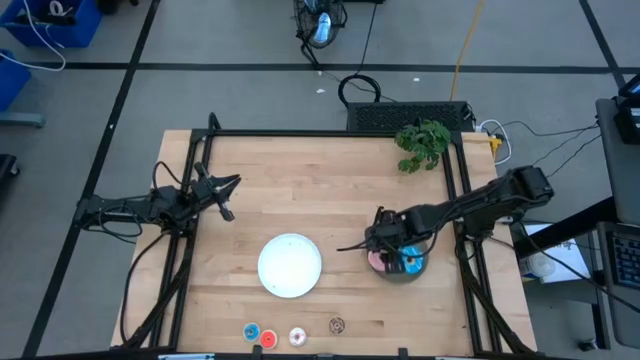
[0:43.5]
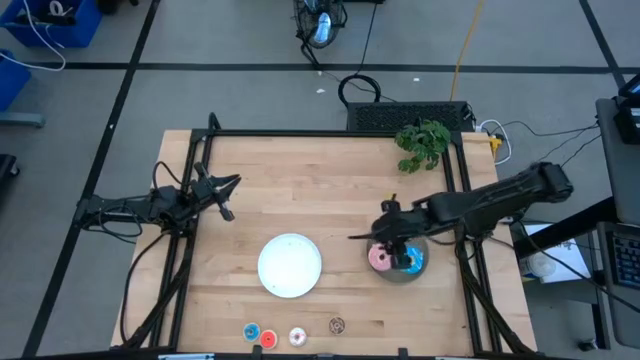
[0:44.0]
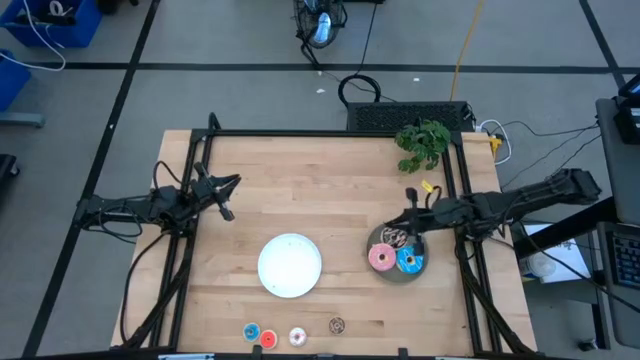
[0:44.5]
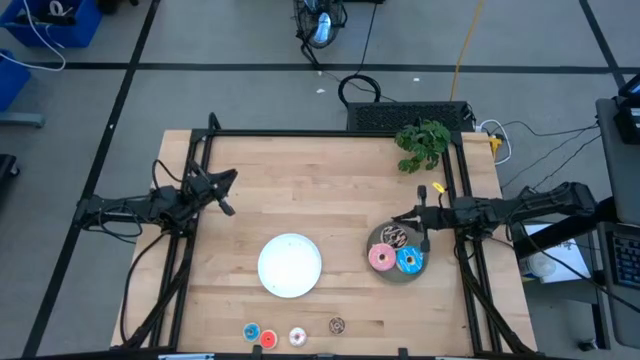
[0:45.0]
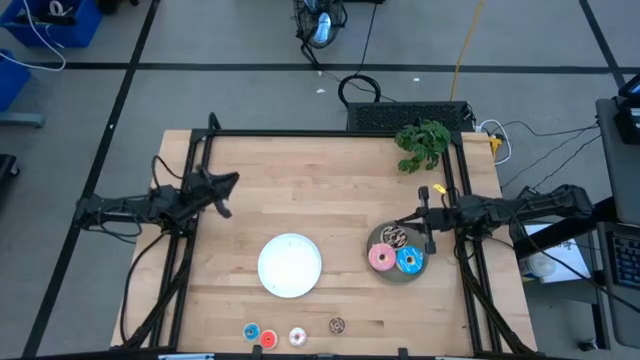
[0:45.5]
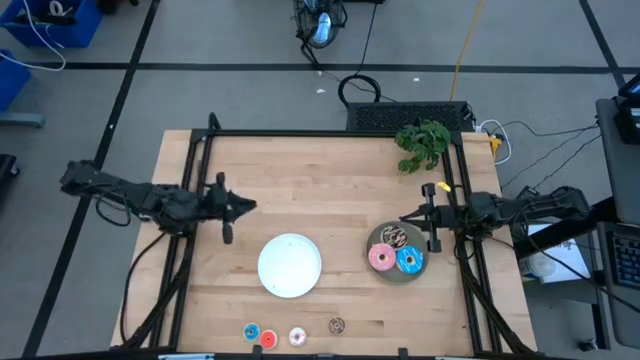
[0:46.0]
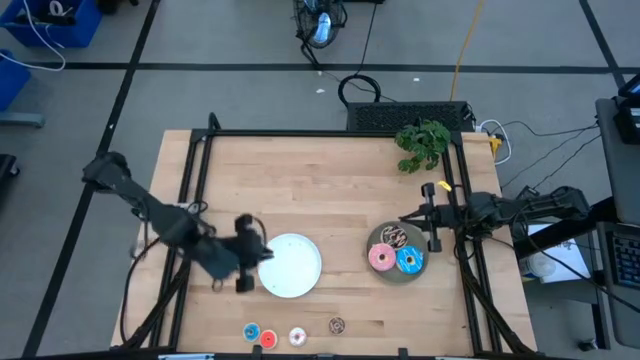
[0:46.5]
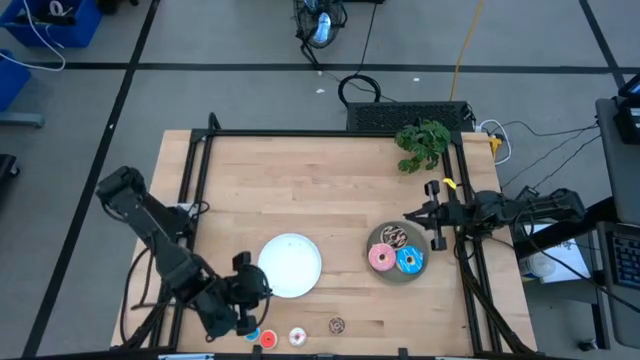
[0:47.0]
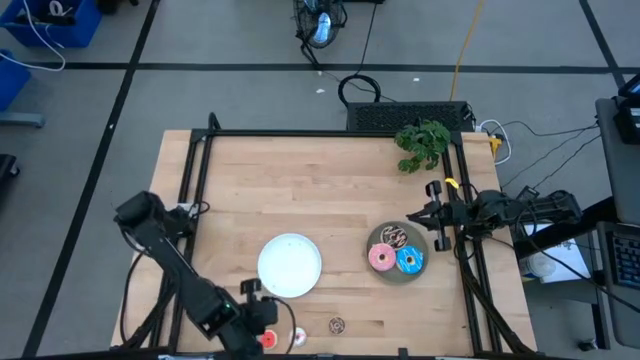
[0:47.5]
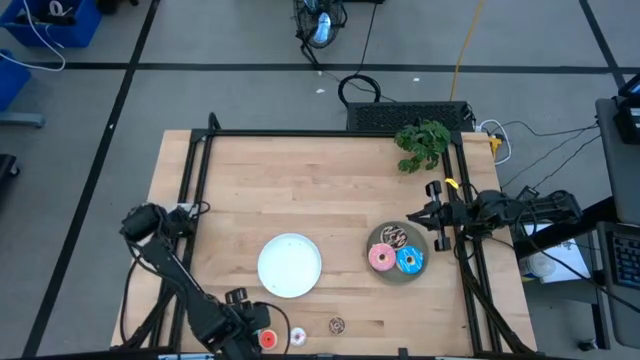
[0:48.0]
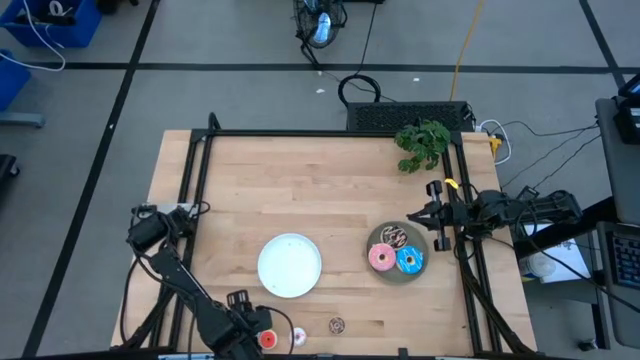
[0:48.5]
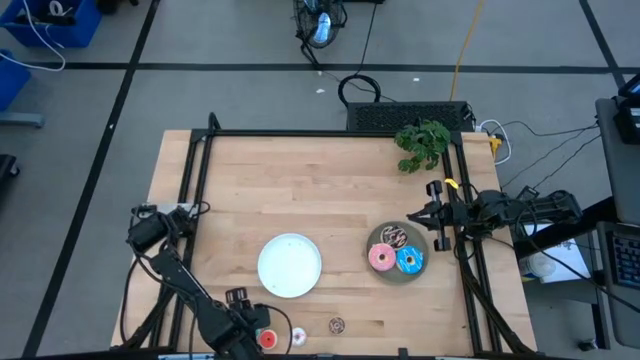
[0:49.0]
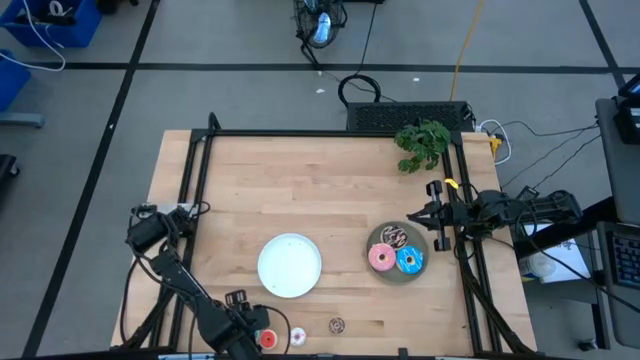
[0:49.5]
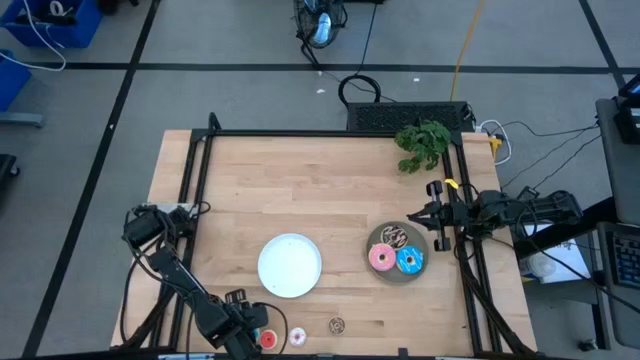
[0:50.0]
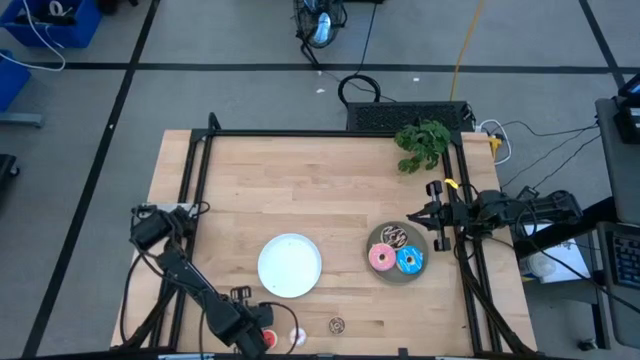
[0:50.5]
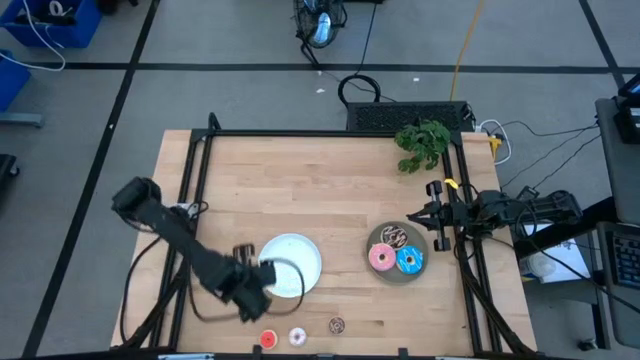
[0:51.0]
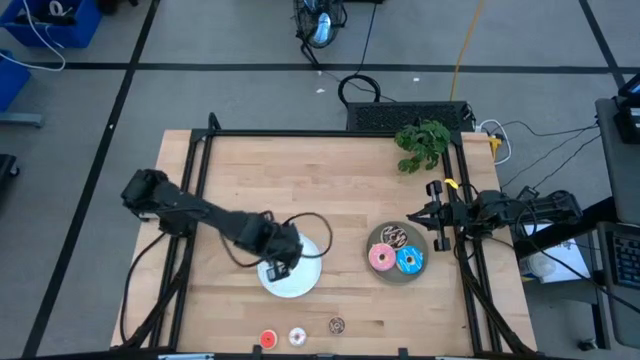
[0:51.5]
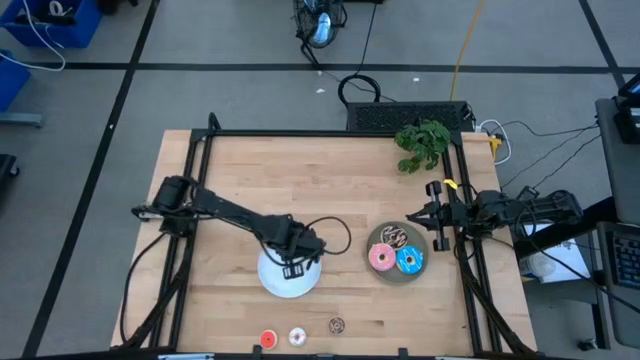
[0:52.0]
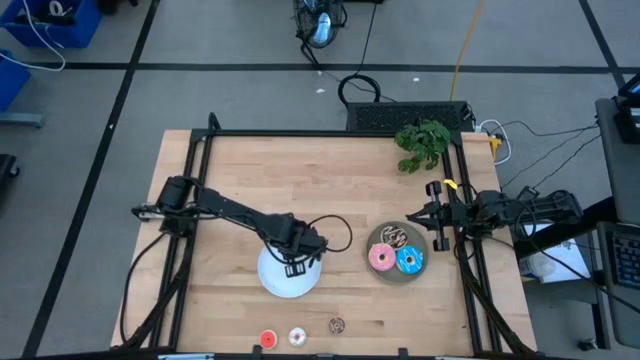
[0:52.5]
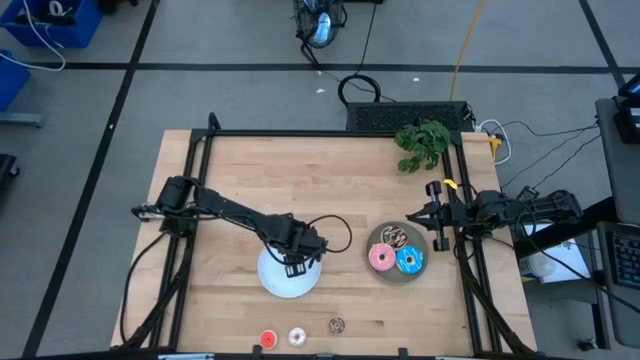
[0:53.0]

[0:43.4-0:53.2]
Task: Pick & Place donuts
Put the small blue donut on the white plate

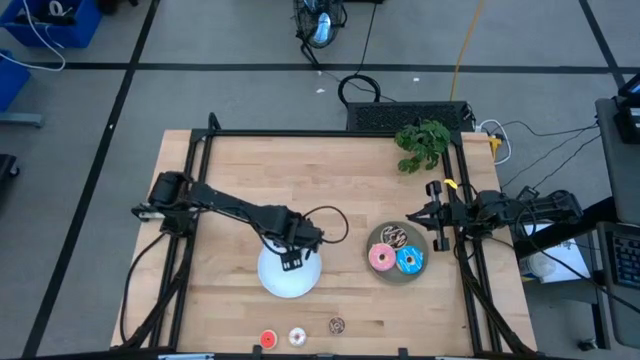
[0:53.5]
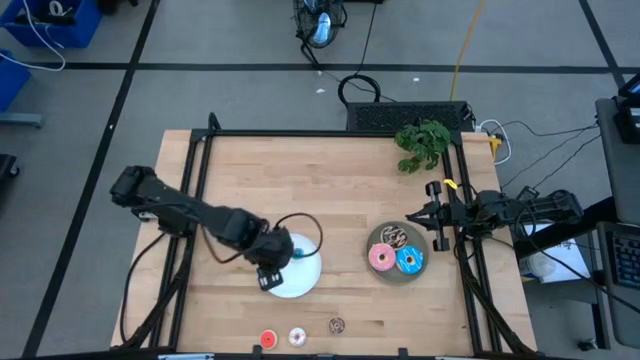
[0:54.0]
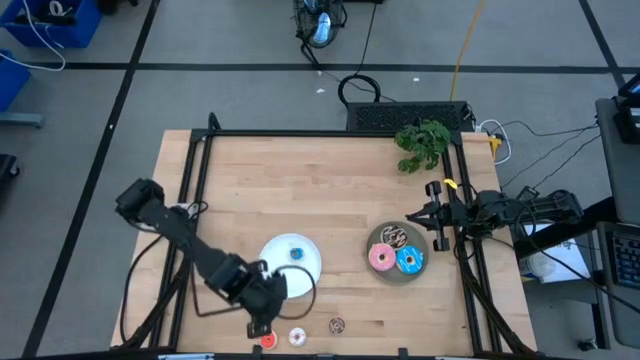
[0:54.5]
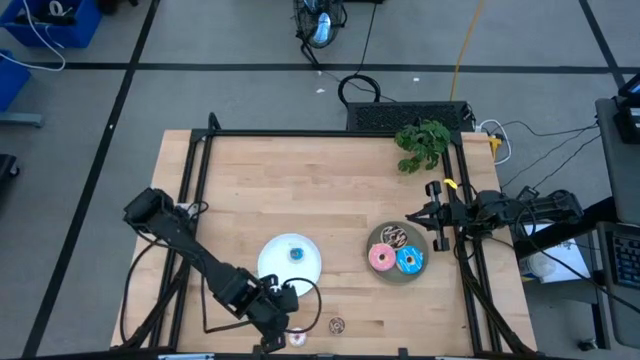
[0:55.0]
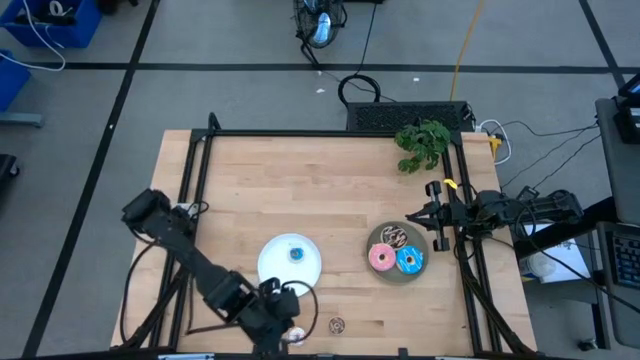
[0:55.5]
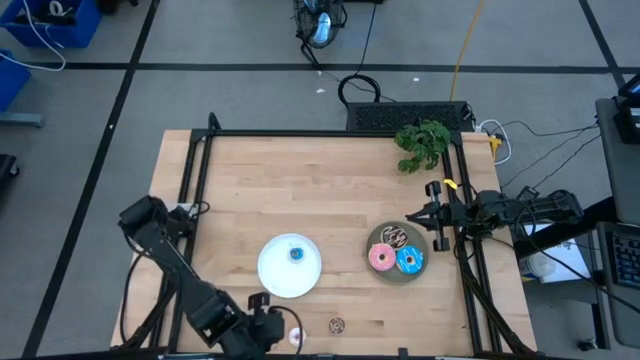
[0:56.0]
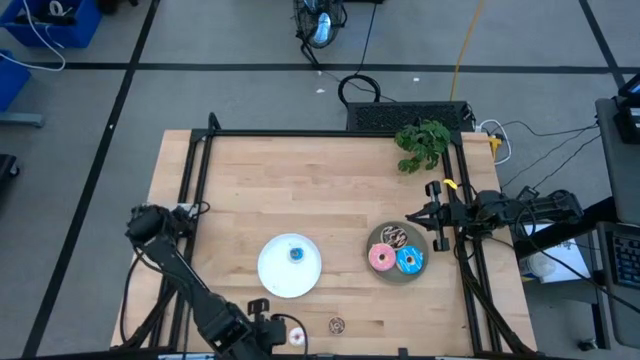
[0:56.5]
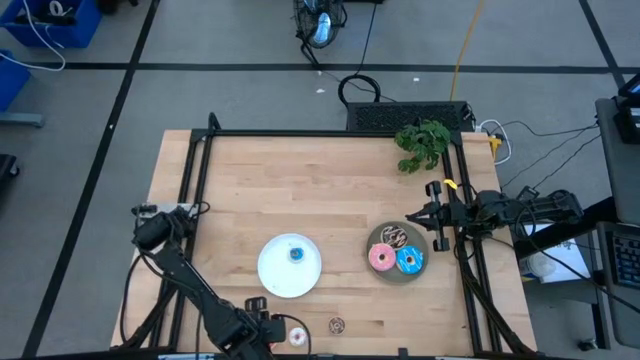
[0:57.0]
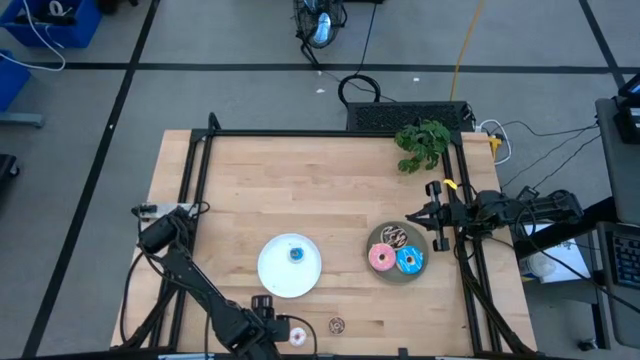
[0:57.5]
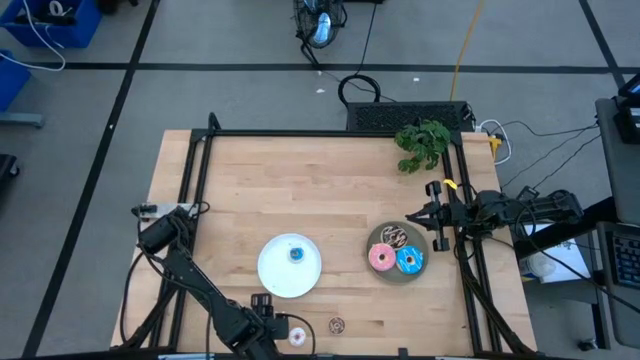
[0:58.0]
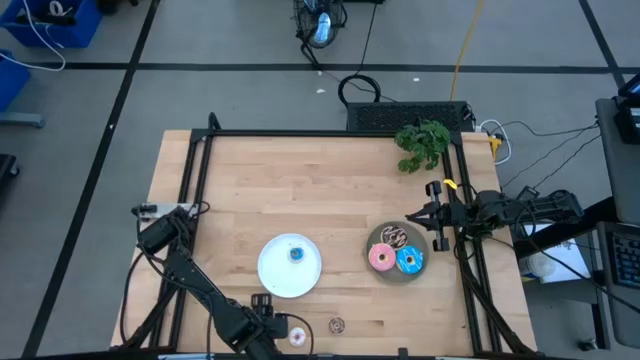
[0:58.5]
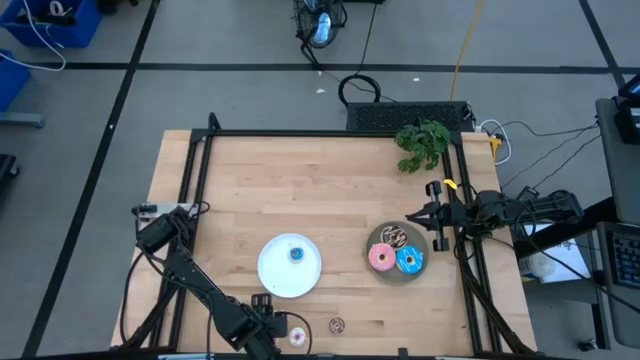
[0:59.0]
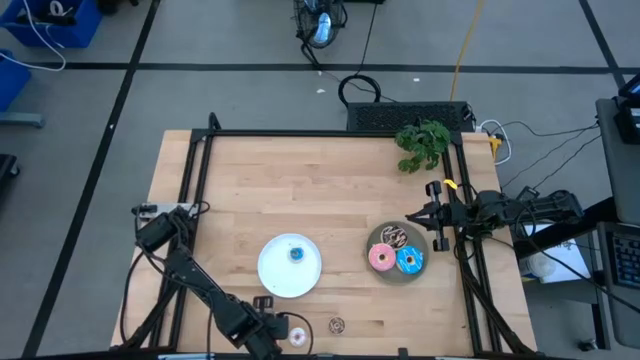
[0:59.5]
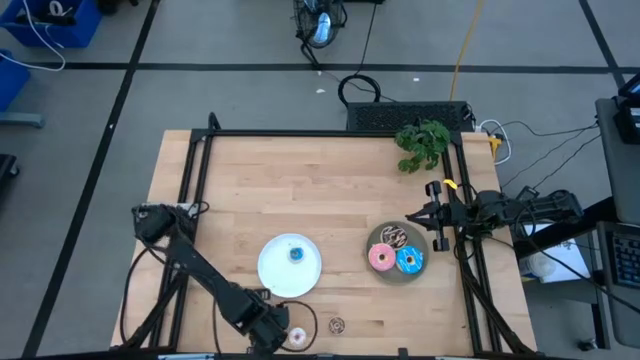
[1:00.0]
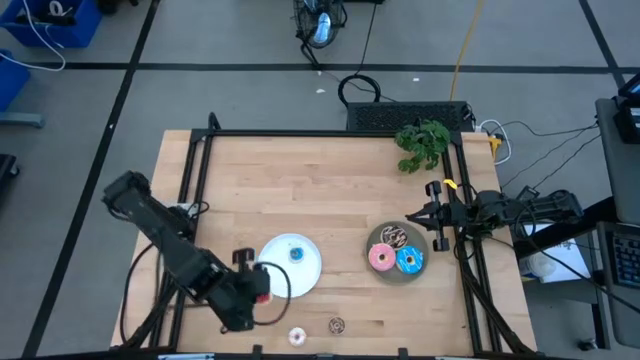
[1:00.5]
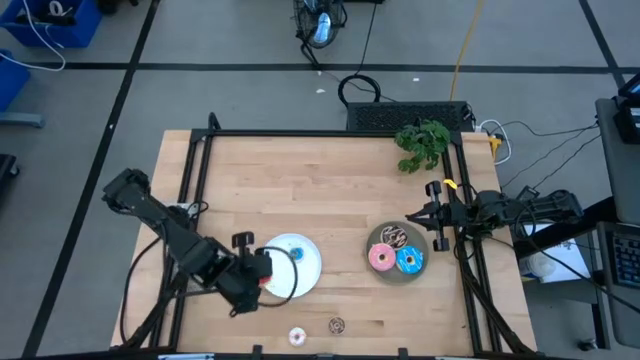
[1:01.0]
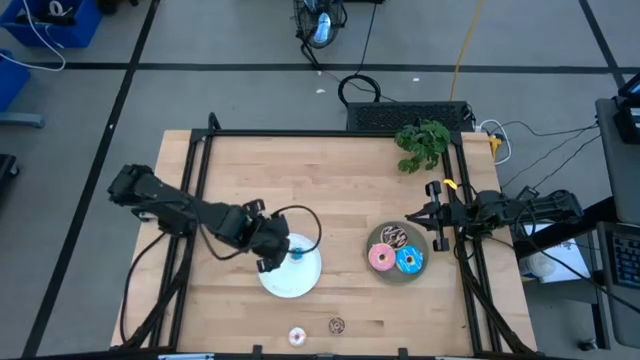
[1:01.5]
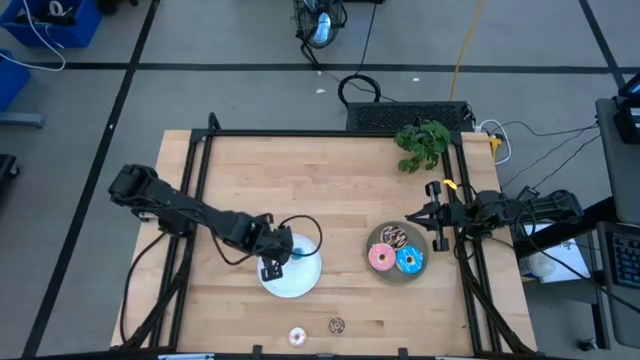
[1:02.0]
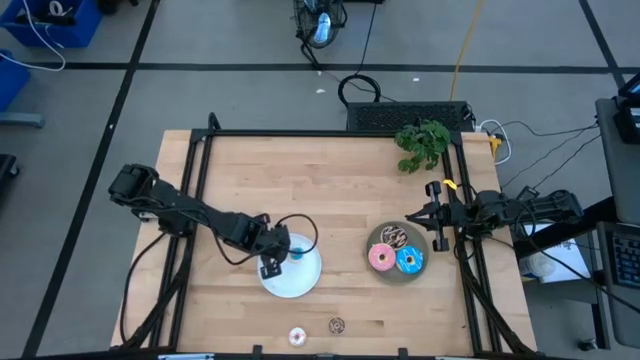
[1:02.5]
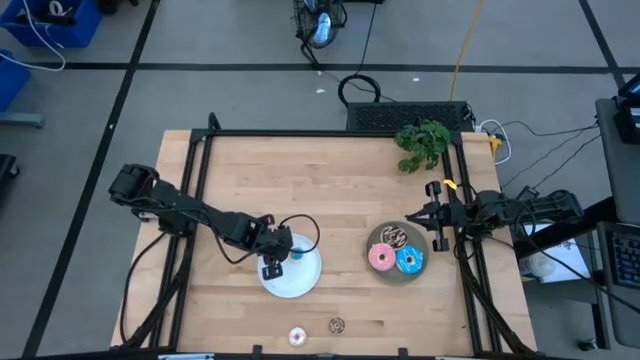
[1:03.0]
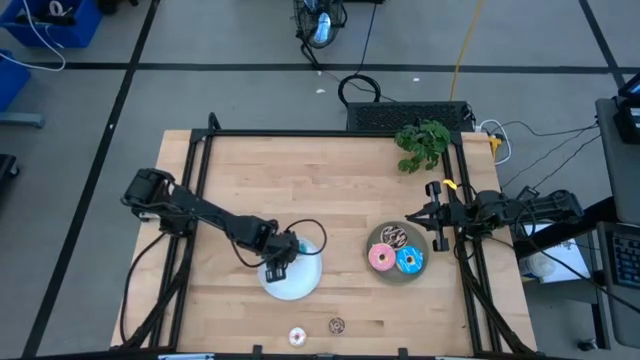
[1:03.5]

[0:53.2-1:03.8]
Put the small orange donut on the white plate

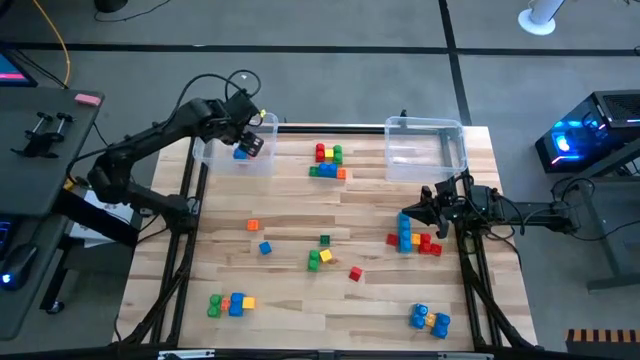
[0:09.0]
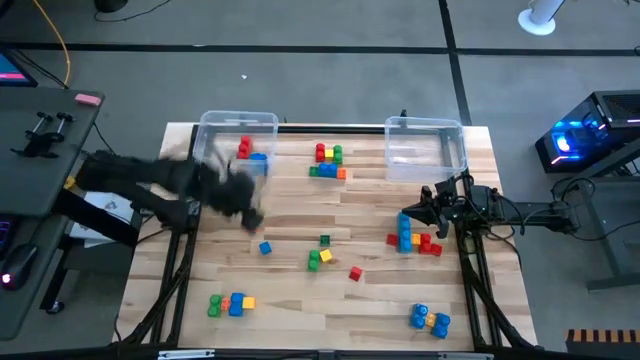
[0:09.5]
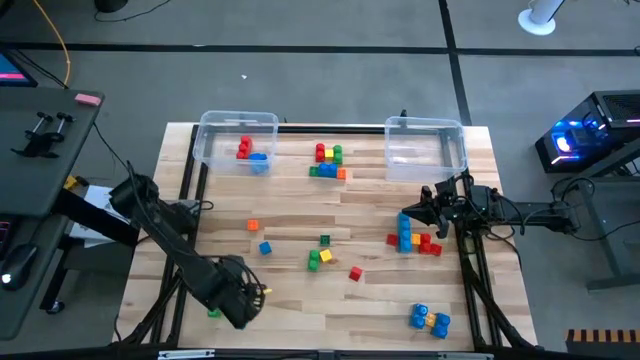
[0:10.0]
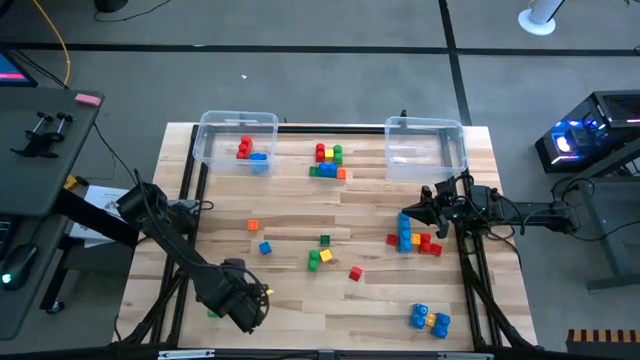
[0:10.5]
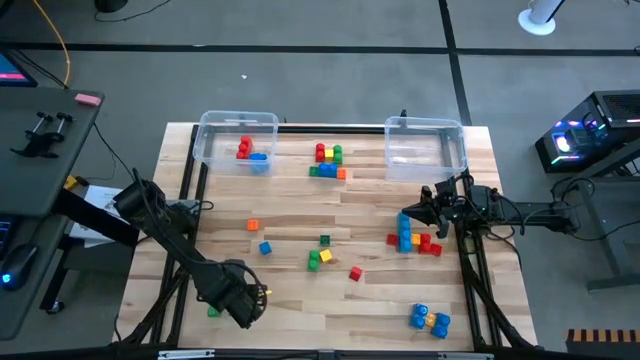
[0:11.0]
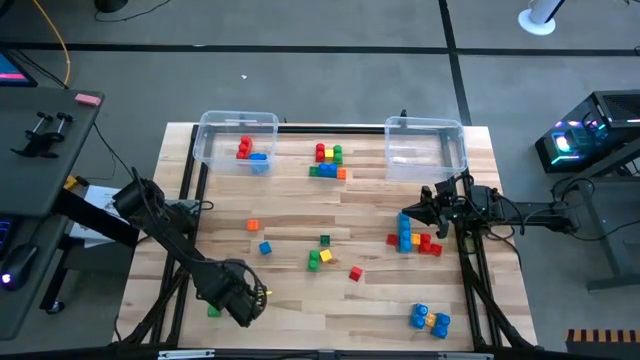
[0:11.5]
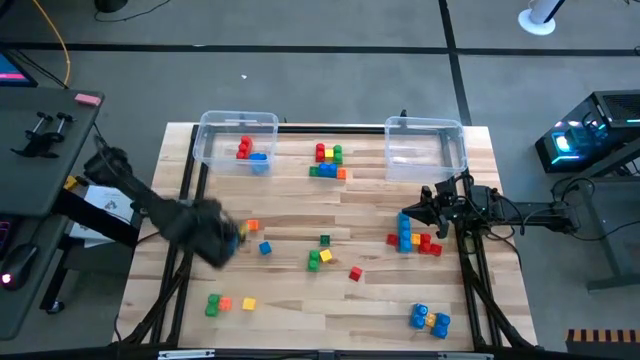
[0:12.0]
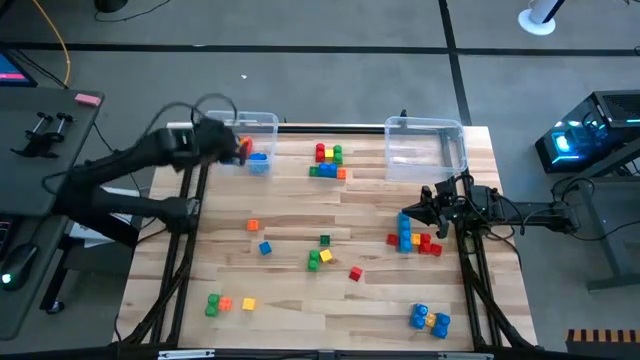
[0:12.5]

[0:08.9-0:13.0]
Task: Sort blocks by size
Put the large game piece into the left transparent bin
